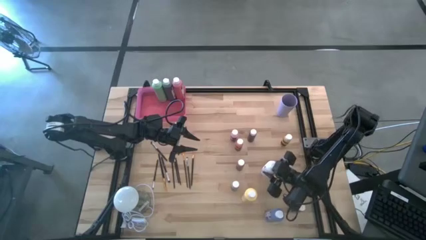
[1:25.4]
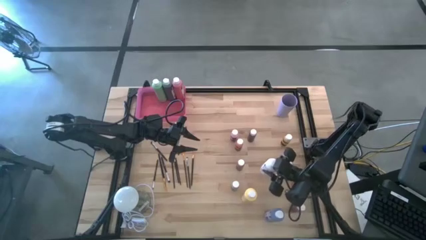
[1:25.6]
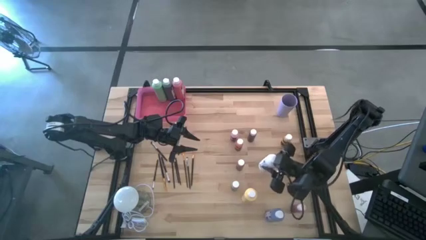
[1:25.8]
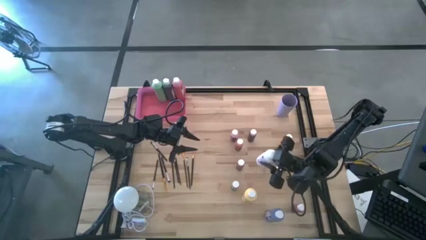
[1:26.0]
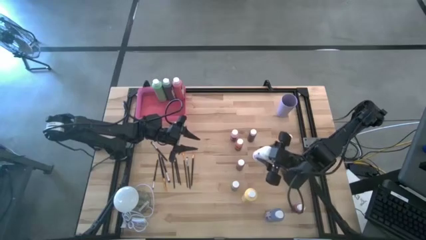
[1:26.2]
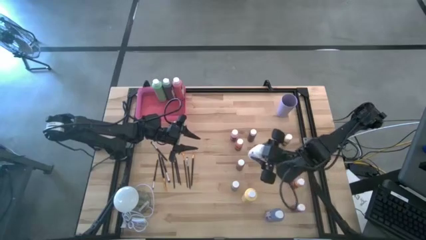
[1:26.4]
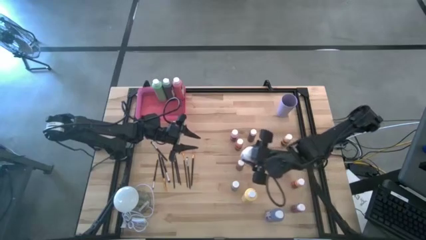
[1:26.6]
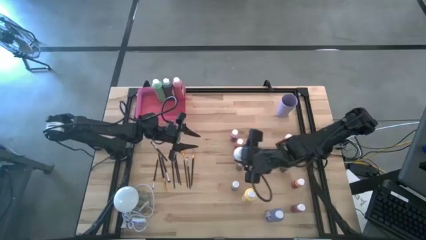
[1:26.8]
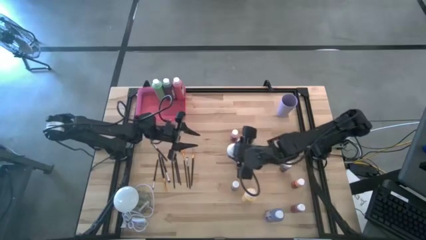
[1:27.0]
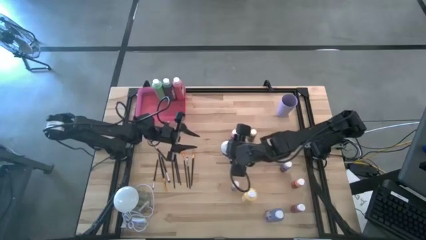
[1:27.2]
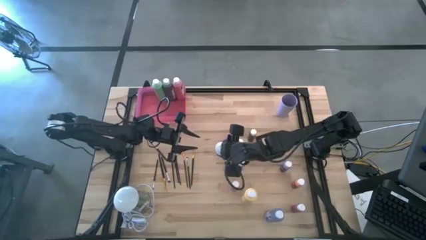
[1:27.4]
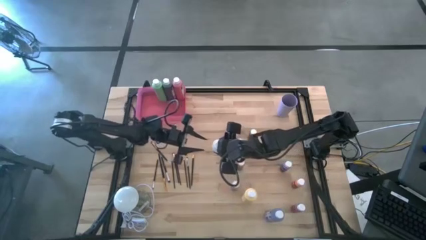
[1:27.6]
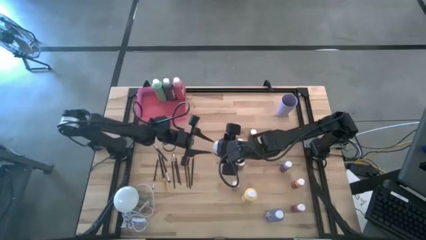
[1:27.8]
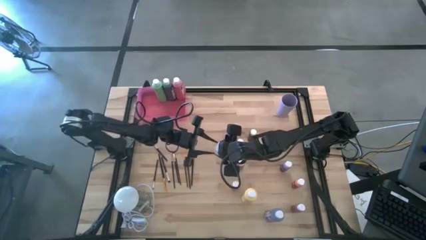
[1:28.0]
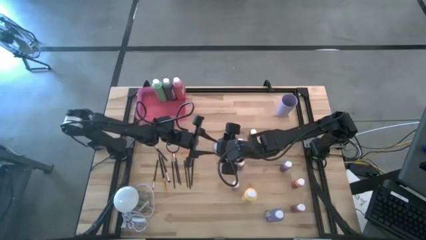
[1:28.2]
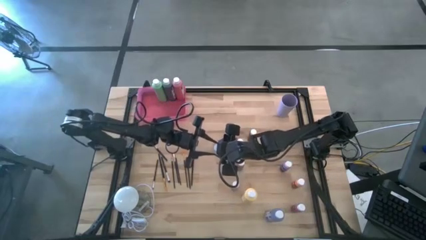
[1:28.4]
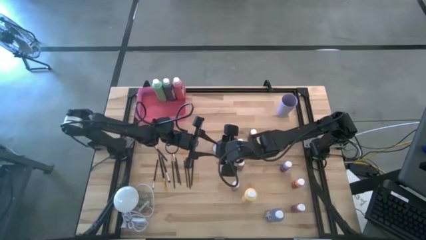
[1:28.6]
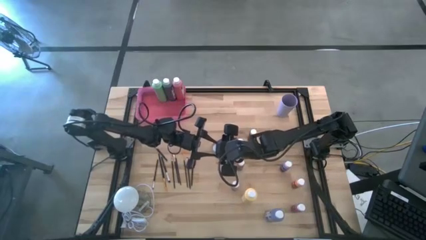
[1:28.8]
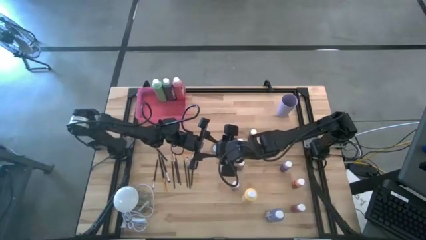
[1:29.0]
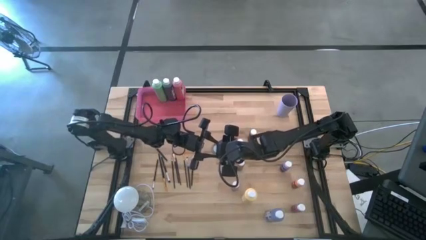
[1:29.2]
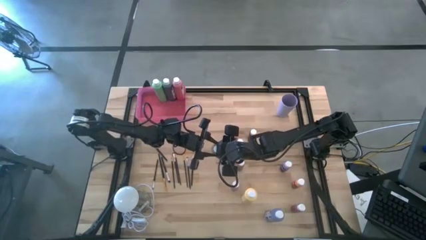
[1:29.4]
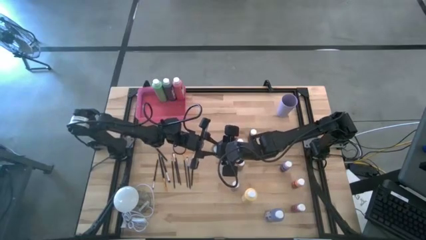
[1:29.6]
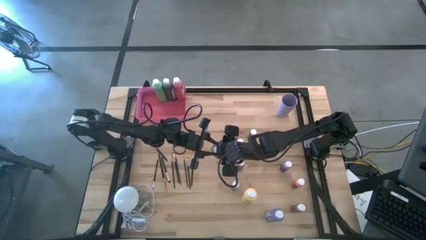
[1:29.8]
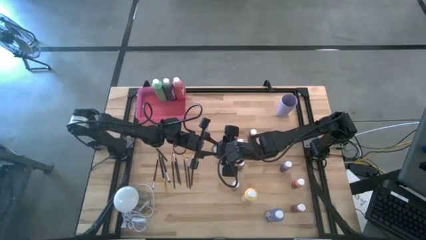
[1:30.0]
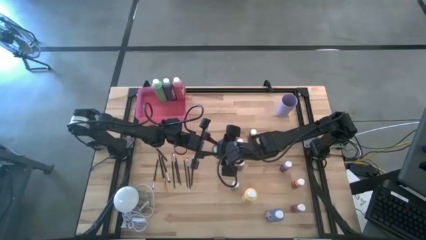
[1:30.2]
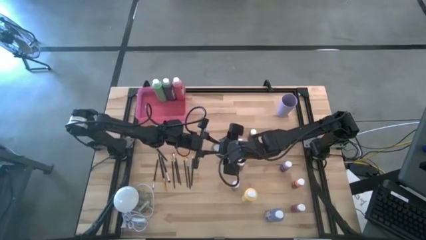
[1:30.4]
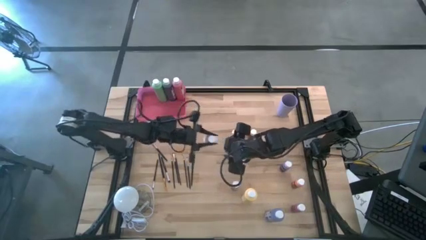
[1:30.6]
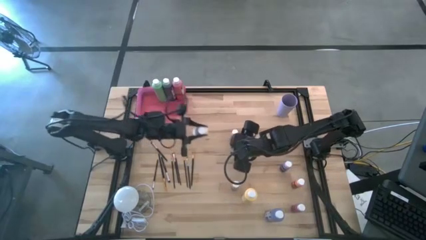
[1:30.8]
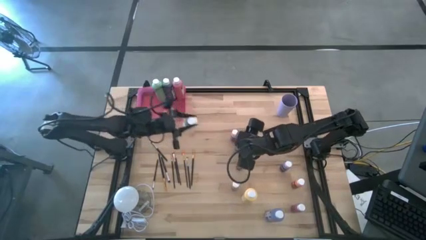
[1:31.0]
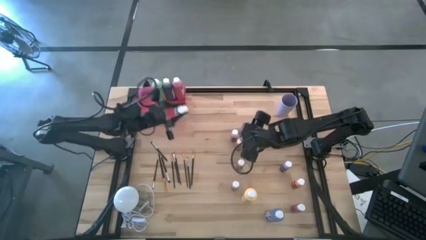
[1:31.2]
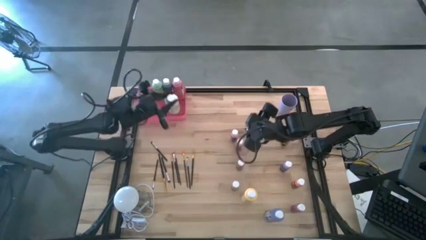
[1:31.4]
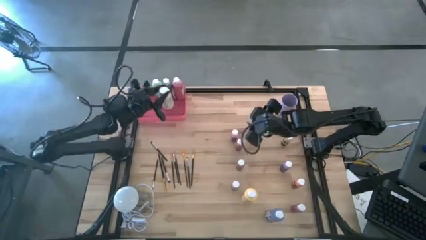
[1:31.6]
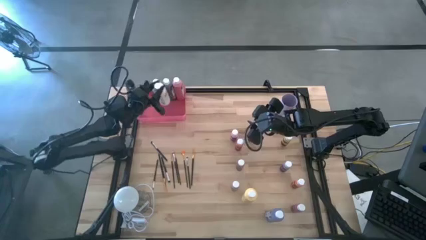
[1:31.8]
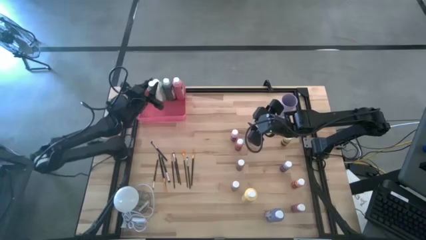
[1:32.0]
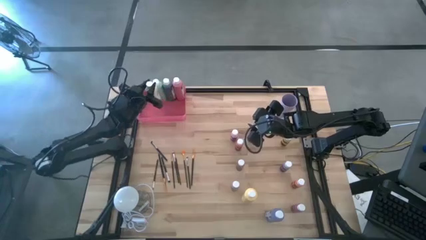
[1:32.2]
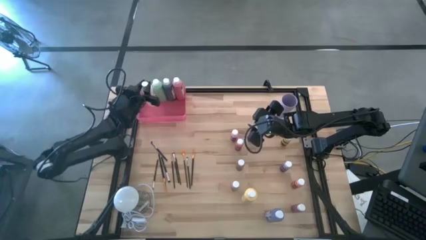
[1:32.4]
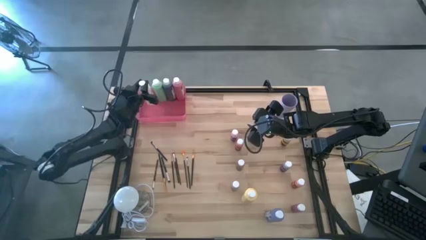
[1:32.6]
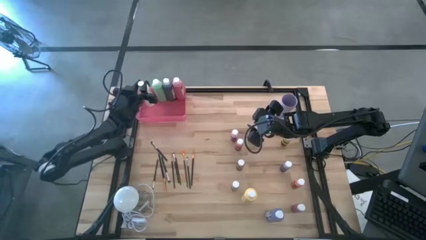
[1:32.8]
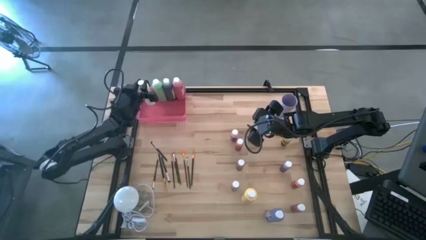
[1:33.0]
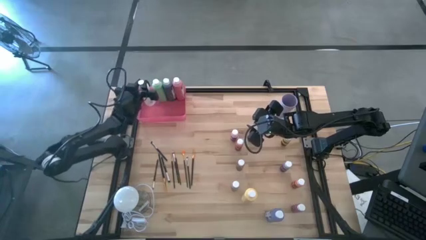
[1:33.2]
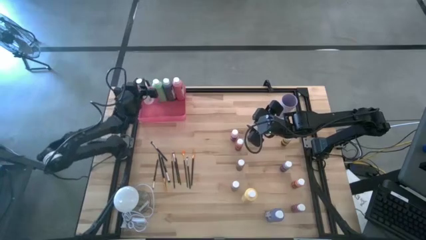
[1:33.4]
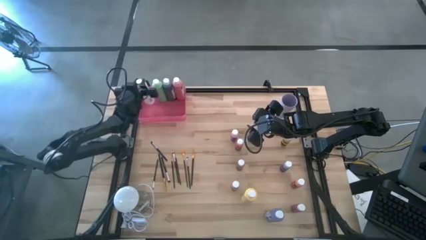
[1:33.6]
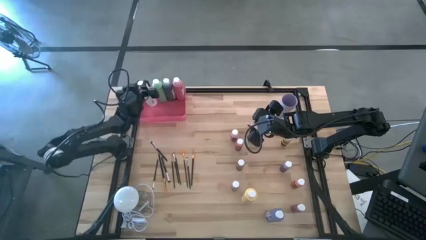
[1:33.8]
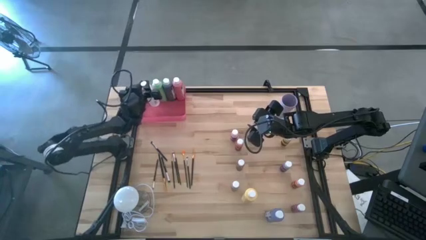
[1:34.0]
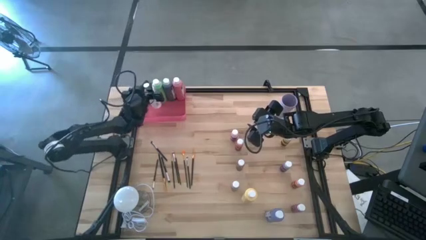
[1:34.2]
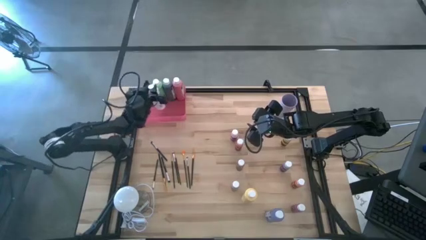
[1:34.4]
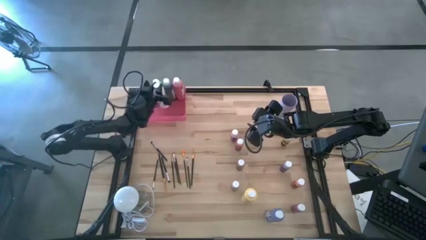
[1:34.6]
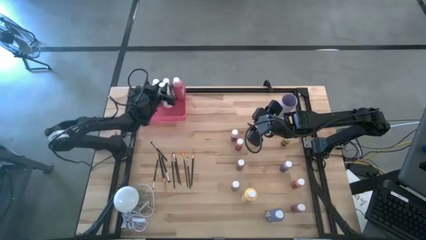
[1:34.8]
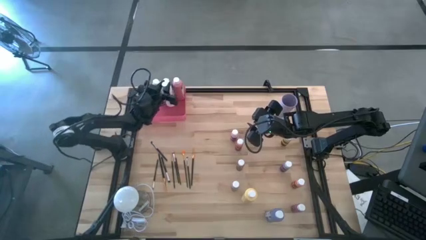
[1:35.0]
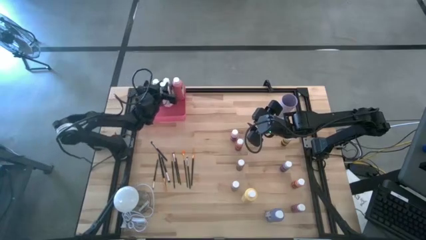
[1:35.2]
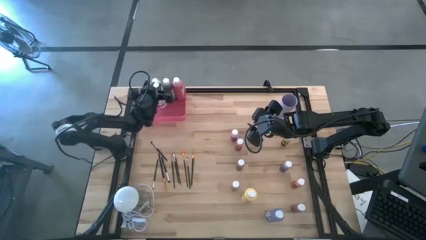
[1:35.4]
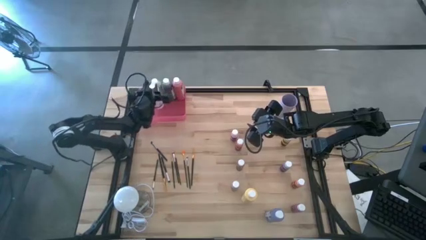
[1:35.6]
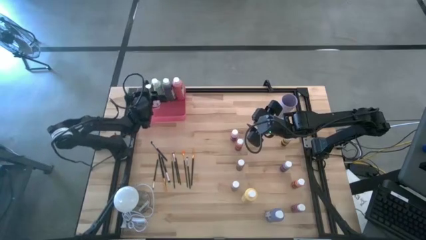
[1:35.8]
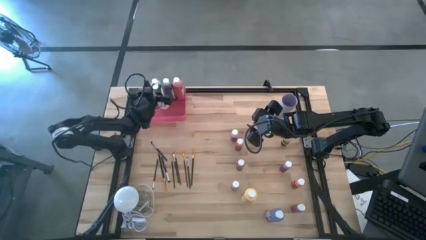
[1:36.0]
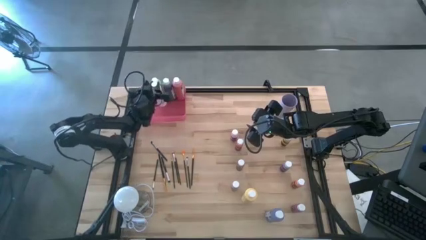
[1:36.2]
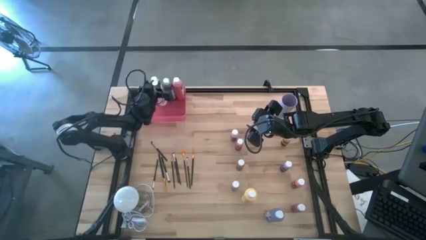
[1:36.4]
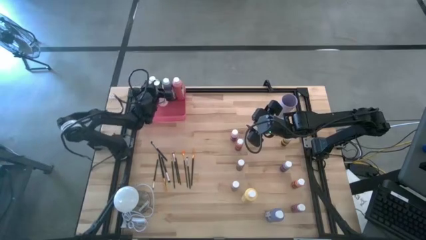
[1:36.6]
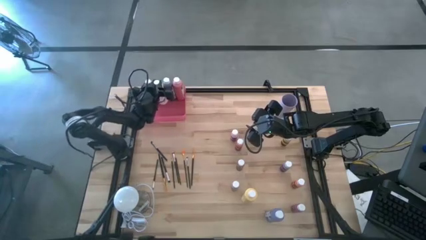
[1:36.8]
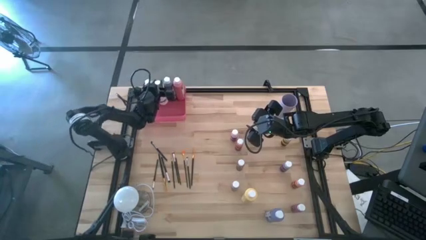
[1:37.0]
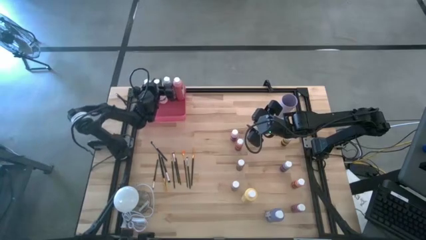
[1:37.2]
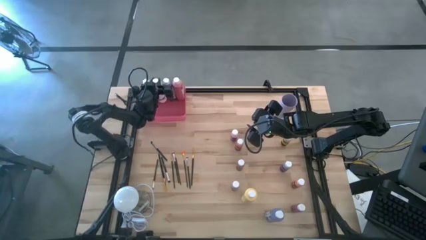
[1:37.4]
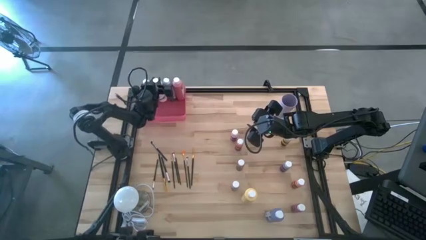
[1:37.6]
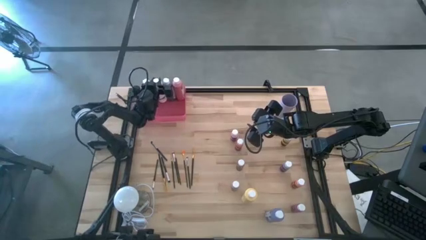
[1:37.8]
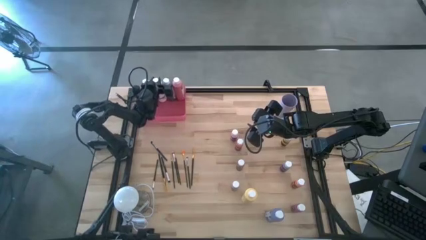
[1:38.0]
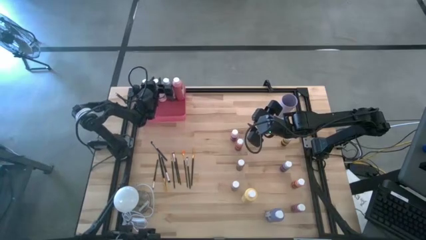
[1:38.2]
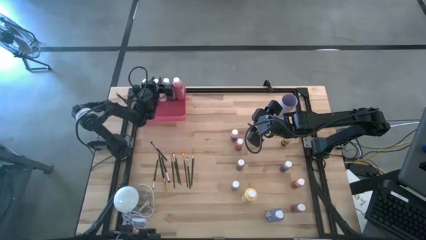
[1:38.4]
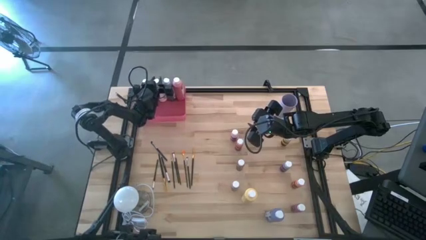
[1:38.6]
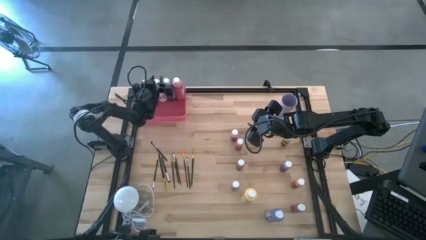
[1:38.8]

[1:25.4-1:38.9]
Task: Pick & Place Paint Supplies
Put the large white paint bottle into the pink bin
